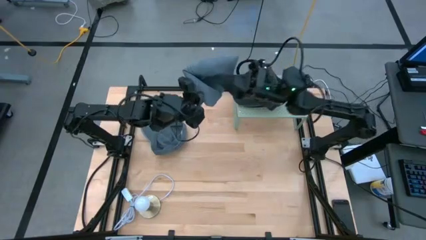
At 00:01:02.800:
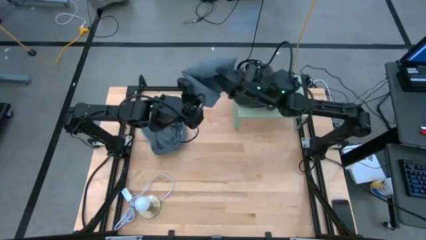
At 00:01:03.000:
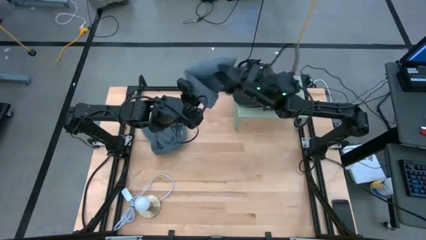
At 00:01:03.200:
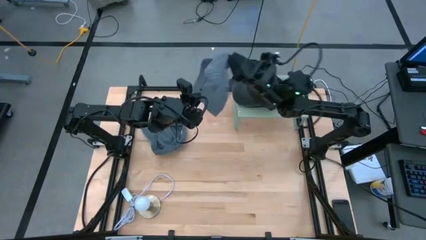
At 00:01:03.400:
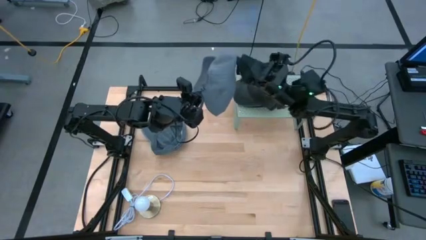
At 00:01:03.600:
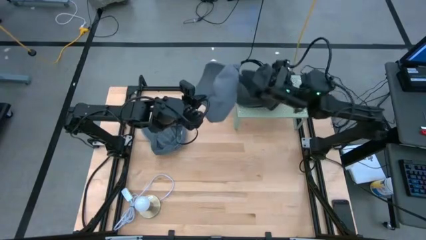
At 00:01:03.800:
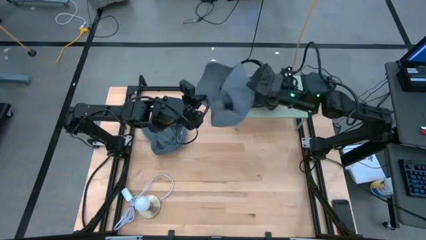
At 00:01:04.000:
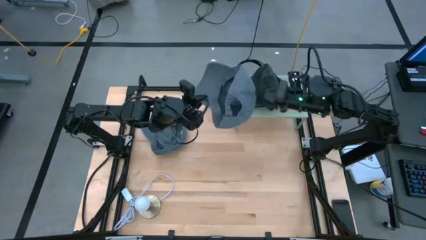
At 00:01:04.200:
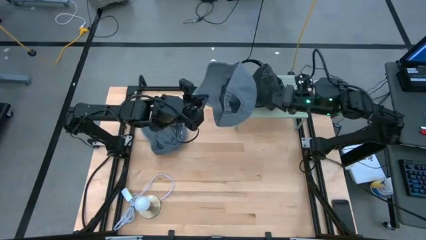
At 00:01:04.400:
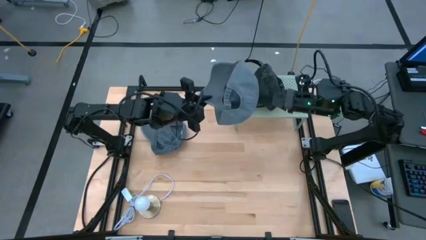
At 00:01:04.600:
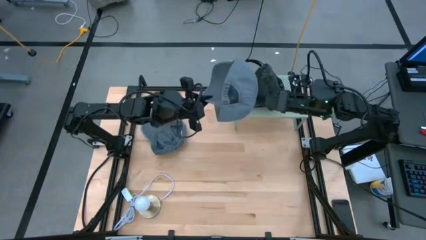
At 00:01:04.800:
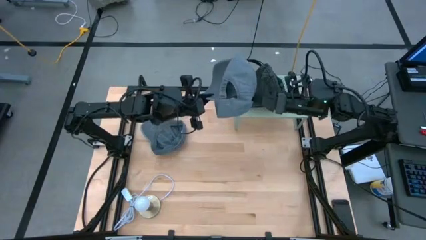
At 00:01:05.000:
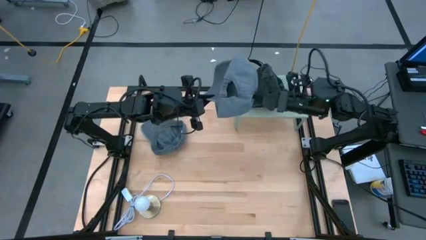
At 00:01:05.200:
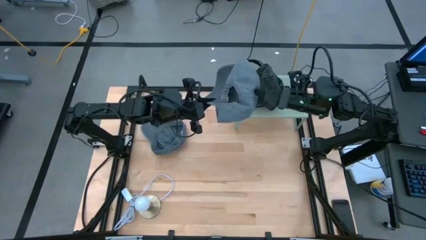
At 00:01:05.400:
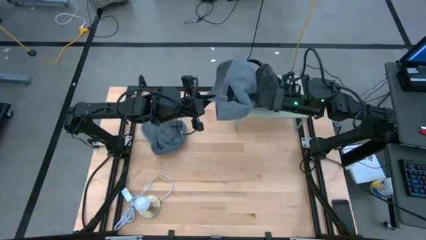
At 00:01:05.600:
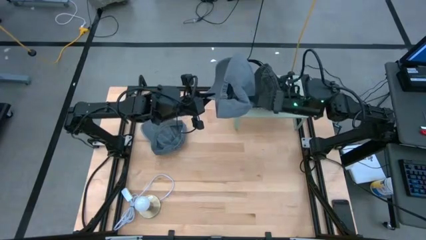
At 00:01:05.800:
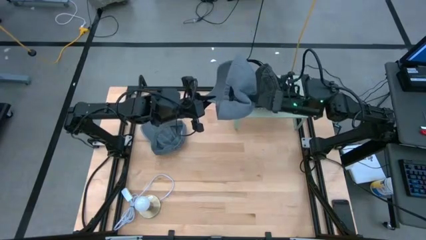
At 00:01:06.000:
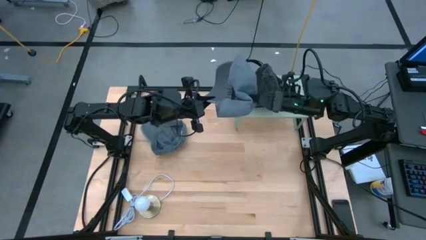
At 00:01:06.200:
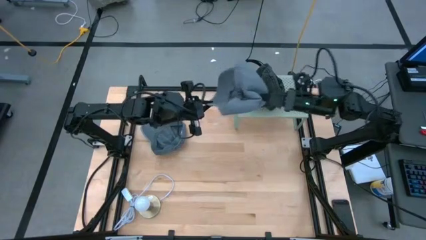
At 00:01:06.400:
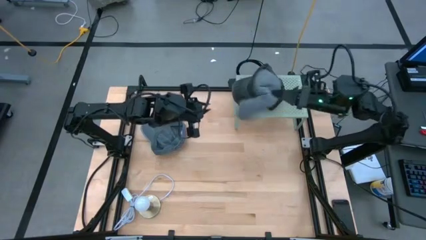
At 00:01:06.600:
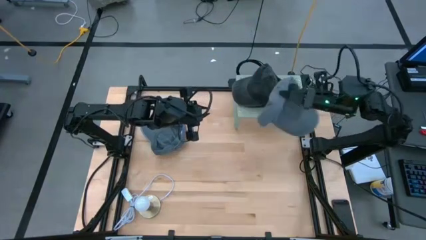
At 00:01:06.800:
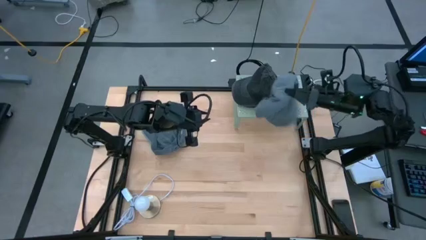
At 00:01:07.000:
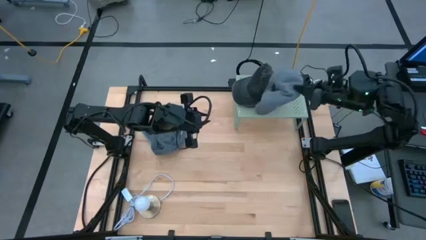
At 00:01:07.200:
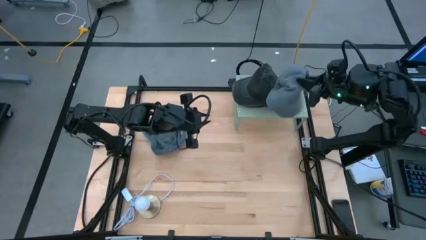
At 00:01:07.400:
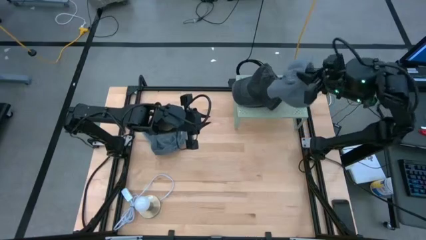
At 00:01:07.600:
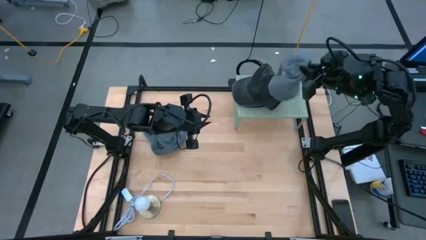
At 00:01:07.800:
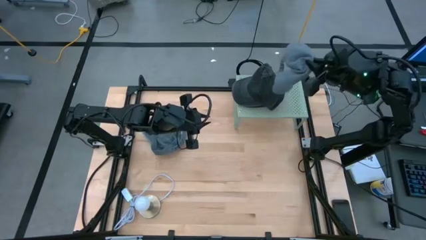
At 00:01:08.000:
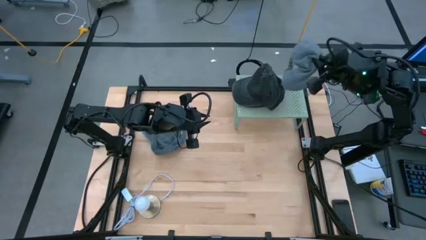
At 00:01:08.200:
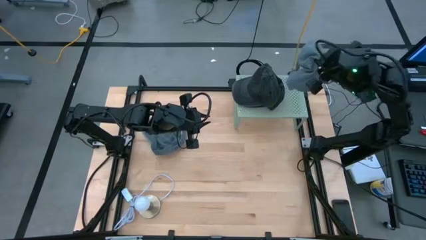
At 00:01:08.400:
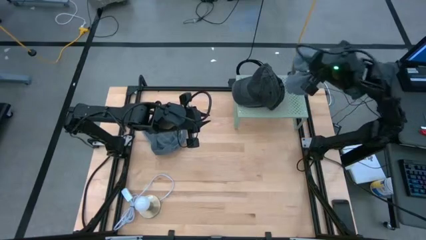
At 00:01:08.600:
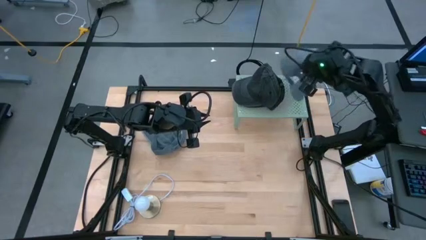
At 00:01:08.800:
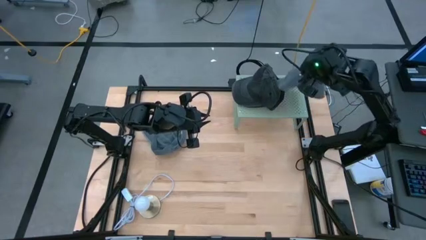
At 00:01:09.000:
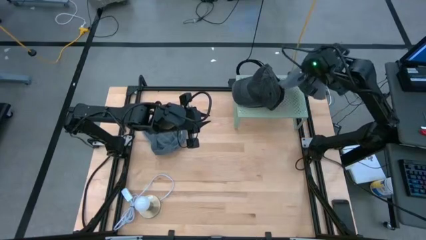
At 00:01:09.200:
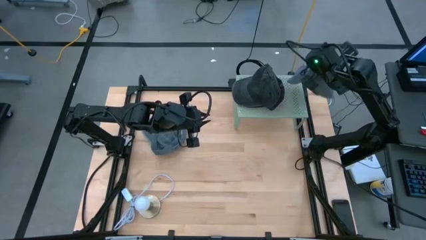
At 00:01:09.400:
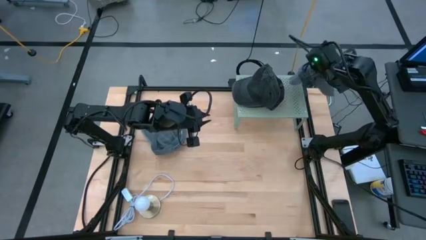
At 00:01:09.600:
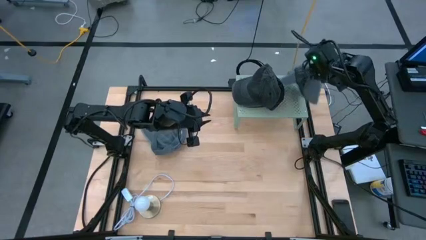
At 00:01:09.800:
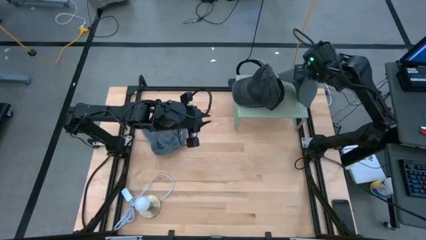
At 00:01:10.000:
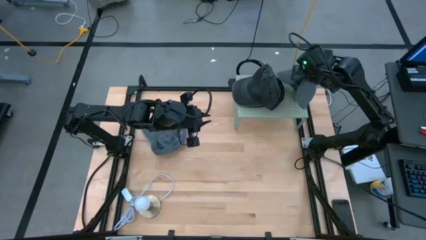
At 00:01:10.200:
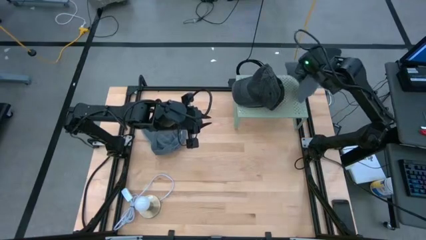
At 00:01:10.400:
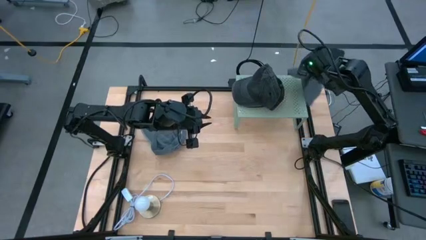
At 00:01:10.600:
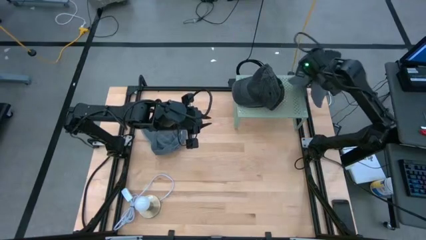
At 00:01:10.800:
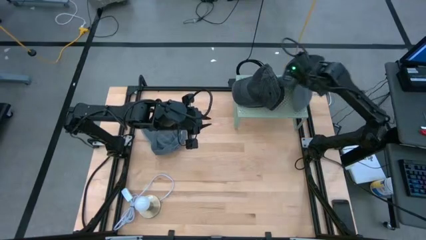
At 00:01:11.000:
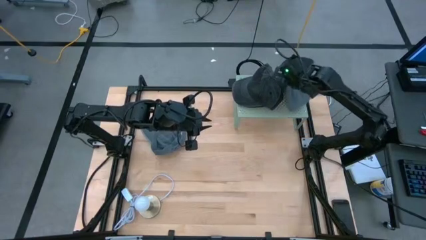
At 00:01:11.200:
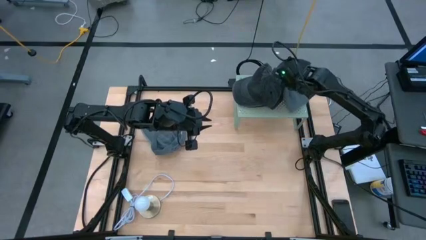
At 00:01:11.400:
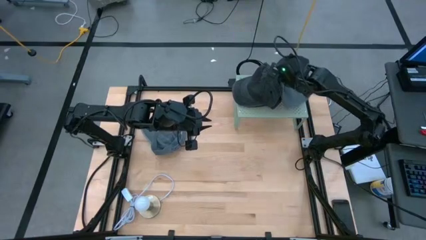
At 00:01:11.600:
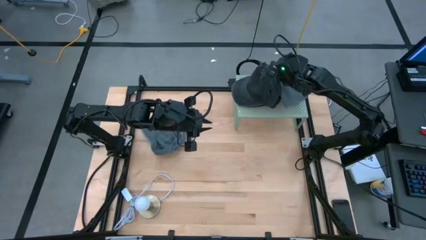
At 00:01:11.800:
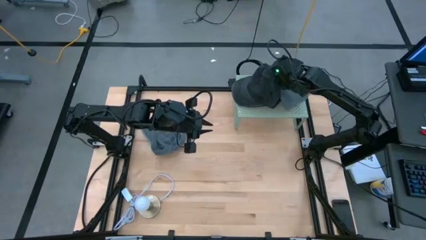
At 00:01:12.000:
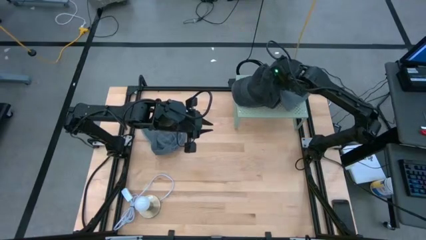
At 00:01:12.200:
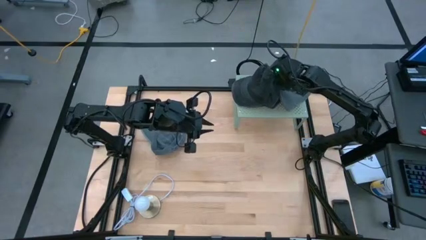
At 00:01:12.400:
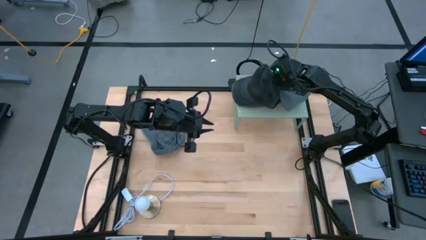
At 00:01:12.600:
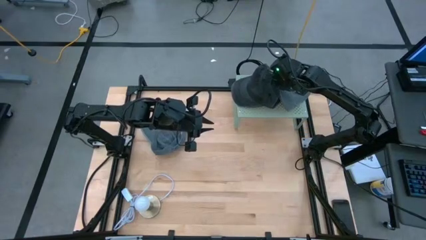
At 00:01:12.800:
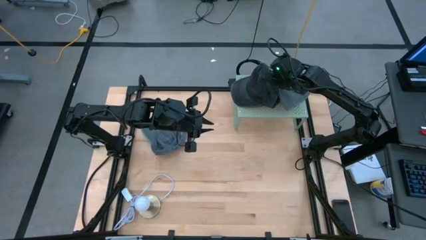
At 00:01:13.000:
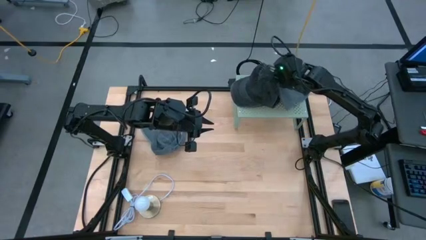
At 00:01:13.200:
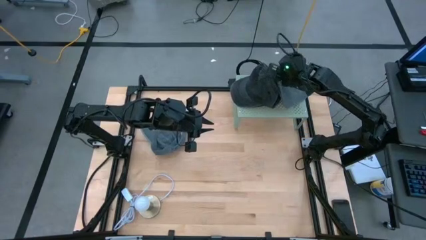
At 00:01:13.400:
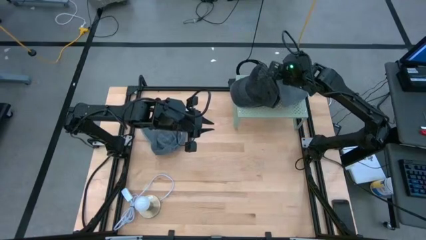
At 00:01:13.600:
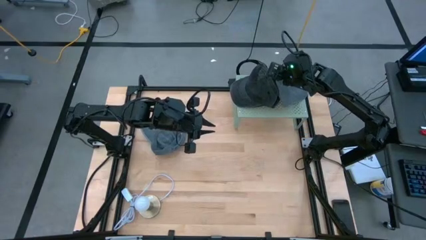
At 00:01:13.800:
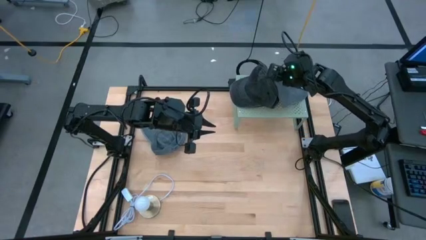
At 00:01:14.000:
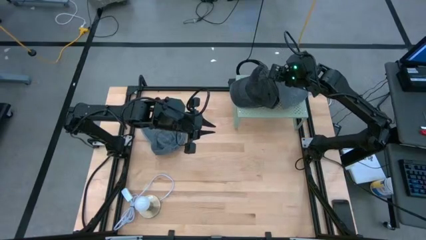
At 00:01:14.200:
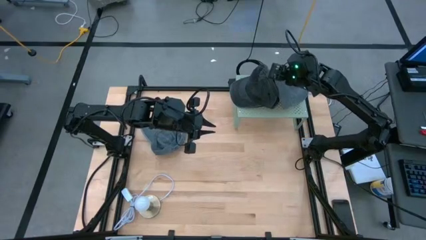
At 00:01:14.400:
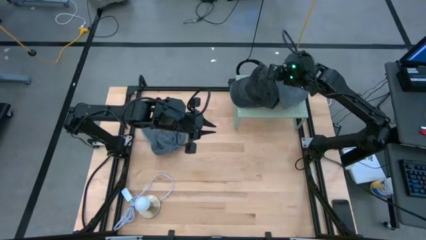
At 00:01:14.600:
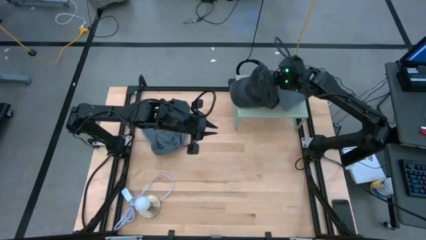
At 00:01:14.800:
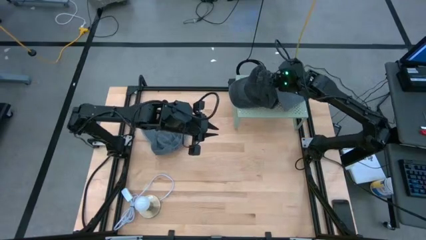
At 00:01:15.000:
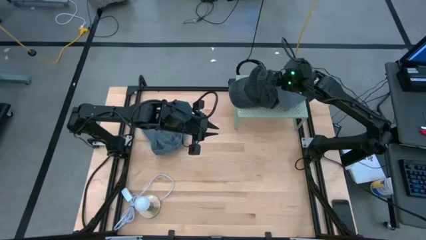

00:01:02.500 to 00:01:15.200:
Task: Pick & Place hat
Put the bottom gray cap on the shelf
